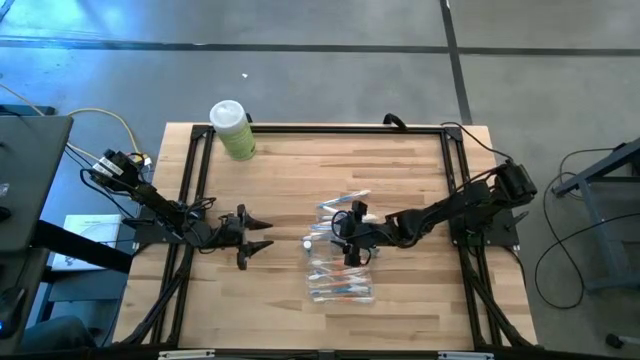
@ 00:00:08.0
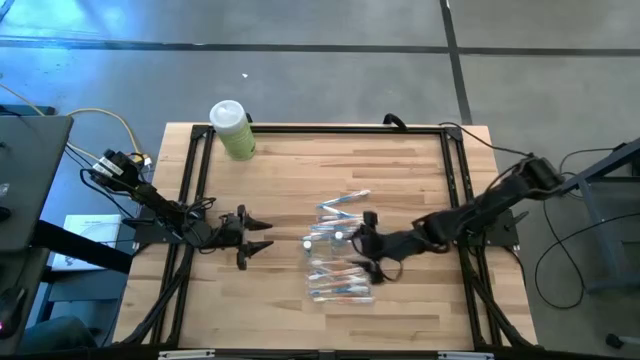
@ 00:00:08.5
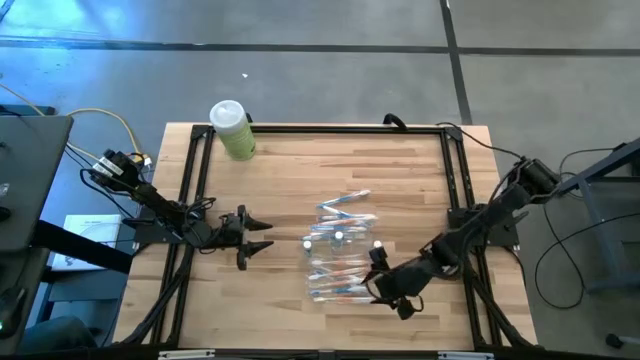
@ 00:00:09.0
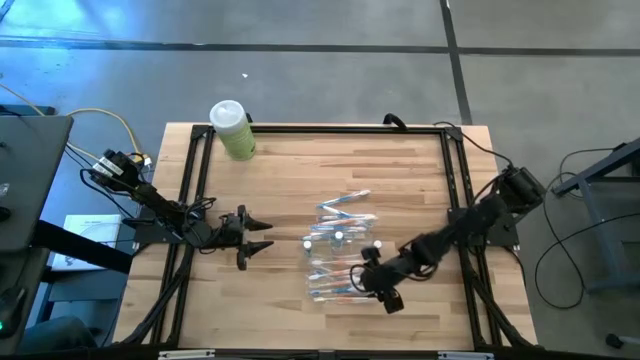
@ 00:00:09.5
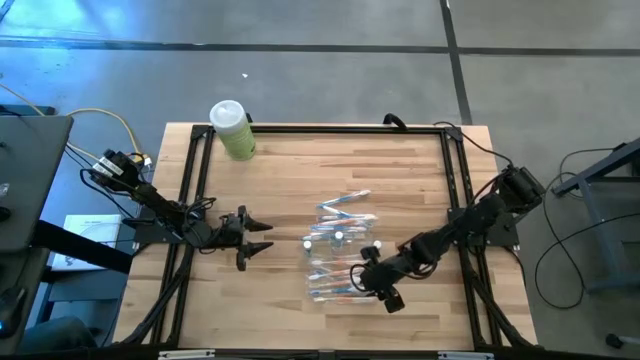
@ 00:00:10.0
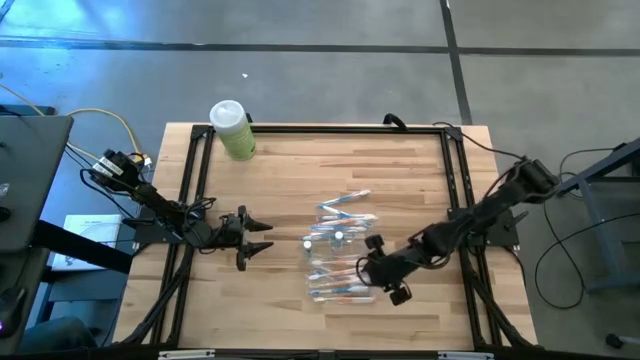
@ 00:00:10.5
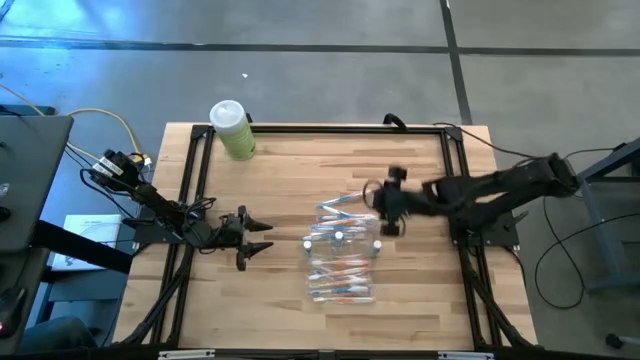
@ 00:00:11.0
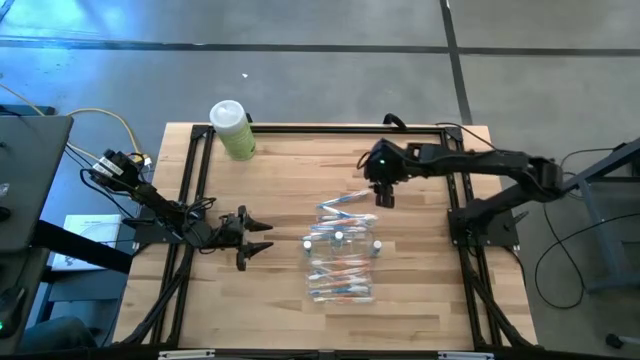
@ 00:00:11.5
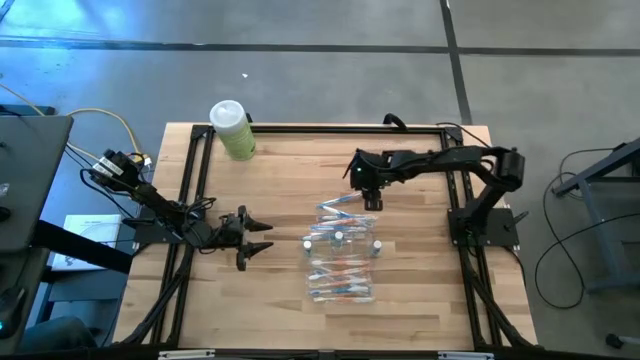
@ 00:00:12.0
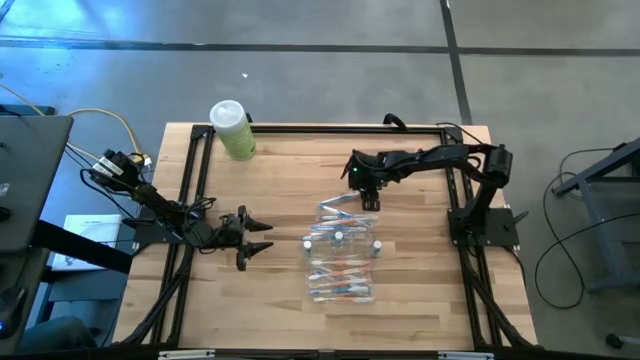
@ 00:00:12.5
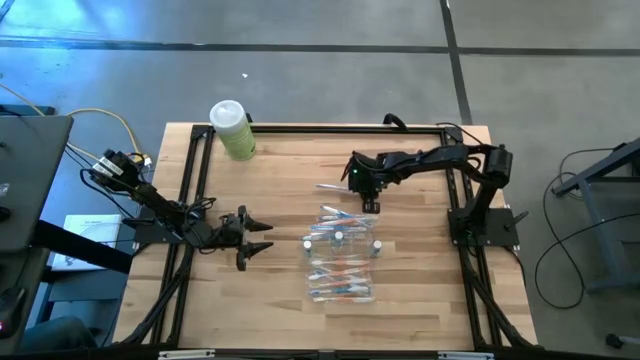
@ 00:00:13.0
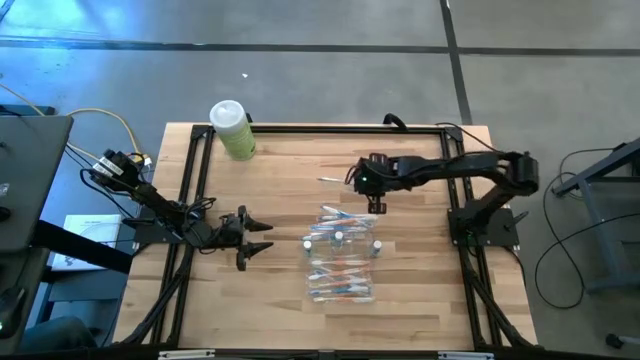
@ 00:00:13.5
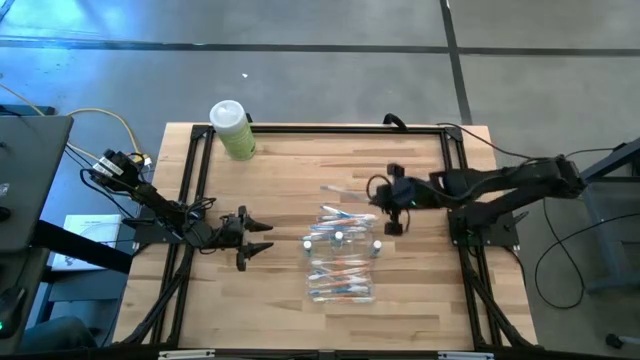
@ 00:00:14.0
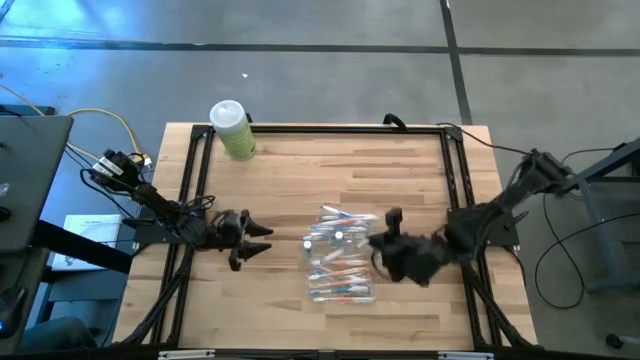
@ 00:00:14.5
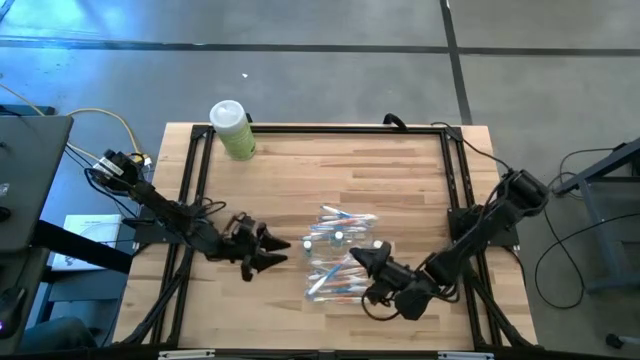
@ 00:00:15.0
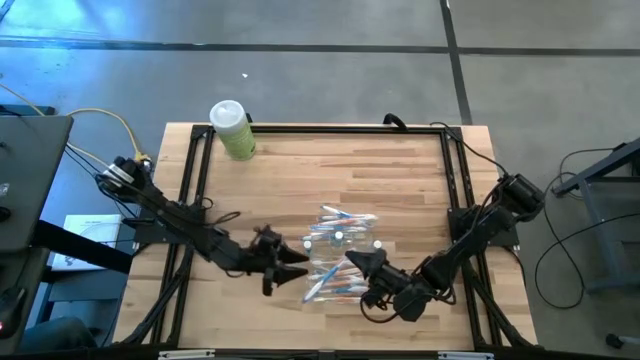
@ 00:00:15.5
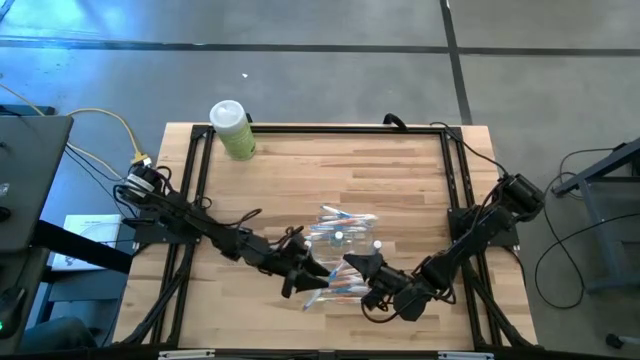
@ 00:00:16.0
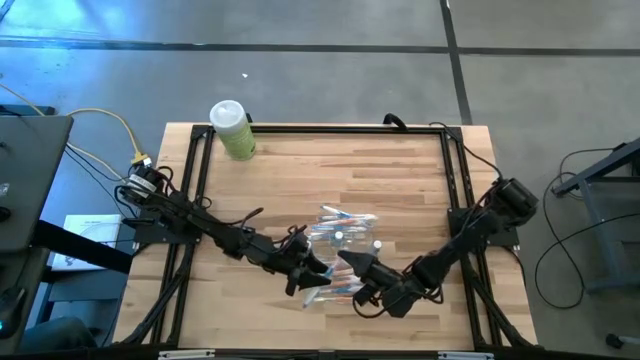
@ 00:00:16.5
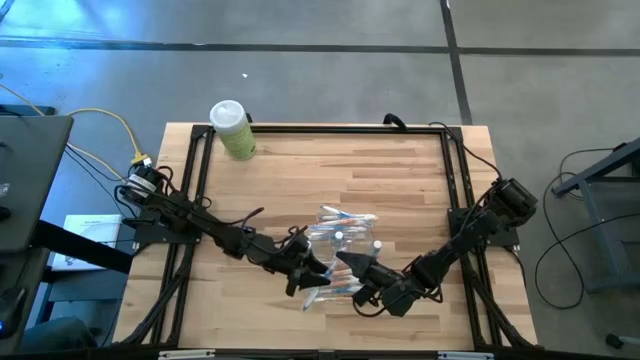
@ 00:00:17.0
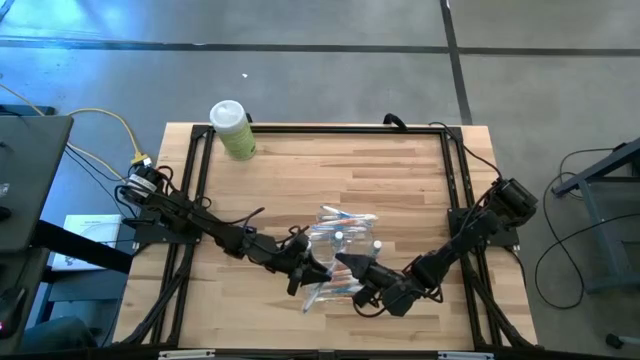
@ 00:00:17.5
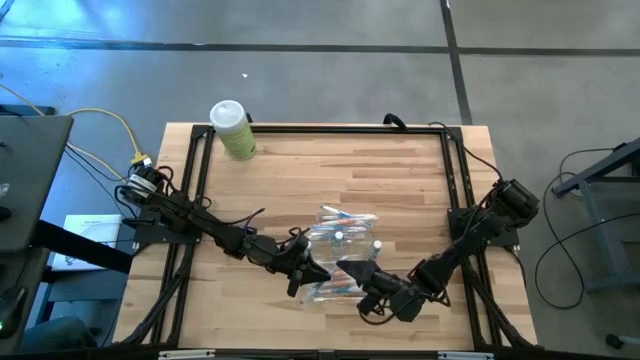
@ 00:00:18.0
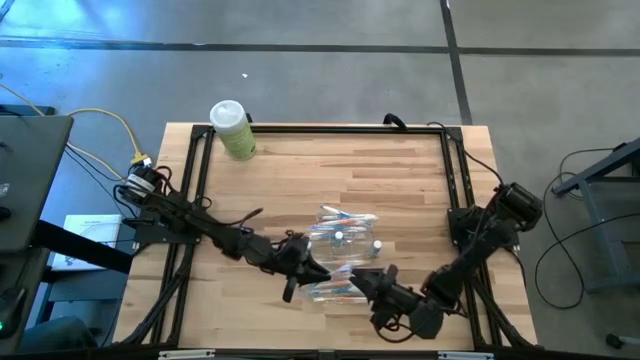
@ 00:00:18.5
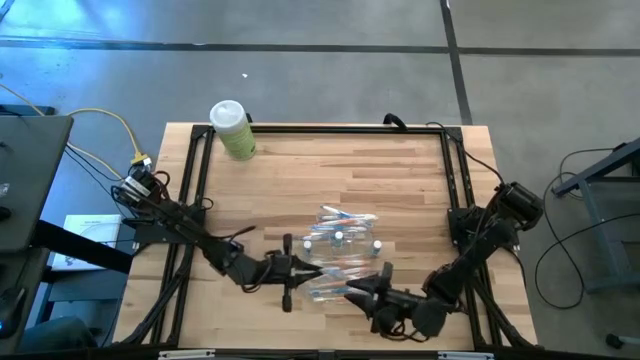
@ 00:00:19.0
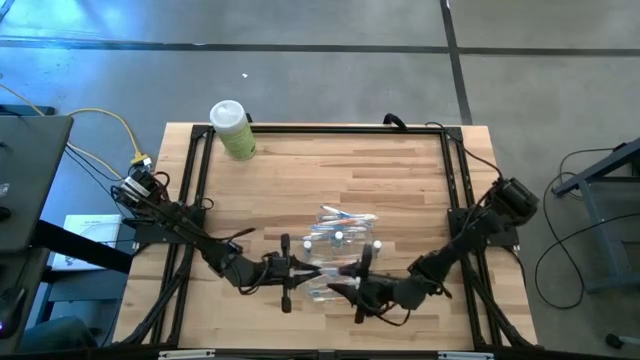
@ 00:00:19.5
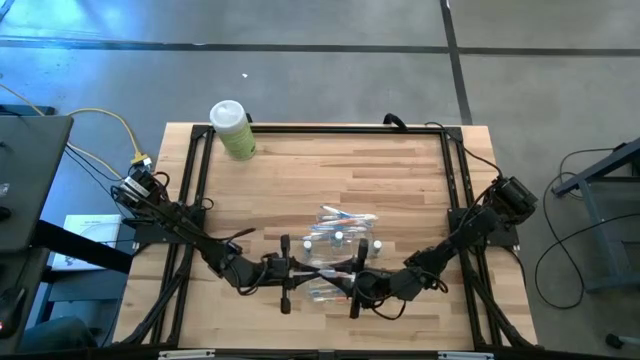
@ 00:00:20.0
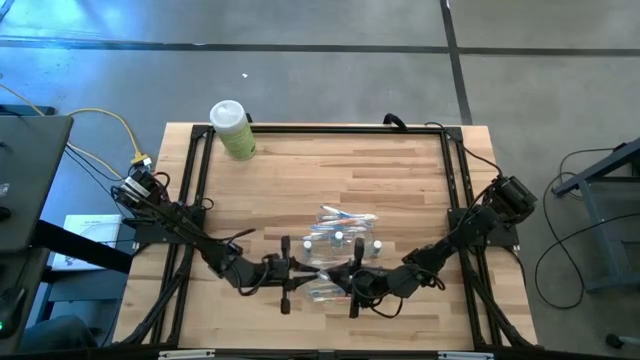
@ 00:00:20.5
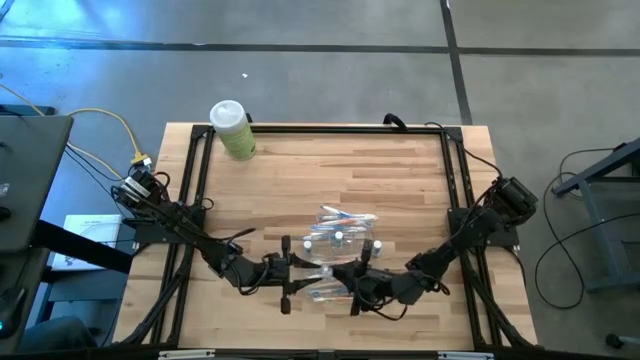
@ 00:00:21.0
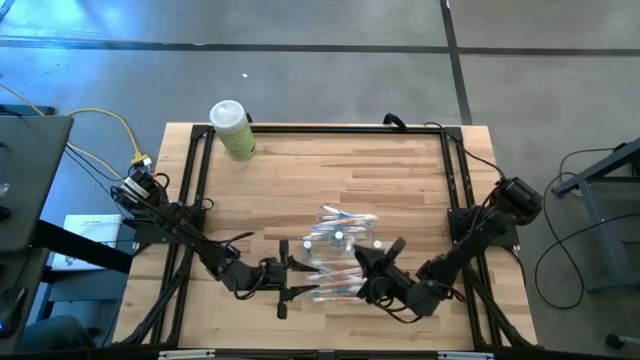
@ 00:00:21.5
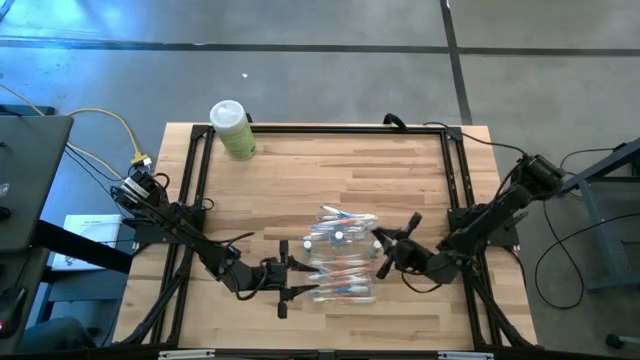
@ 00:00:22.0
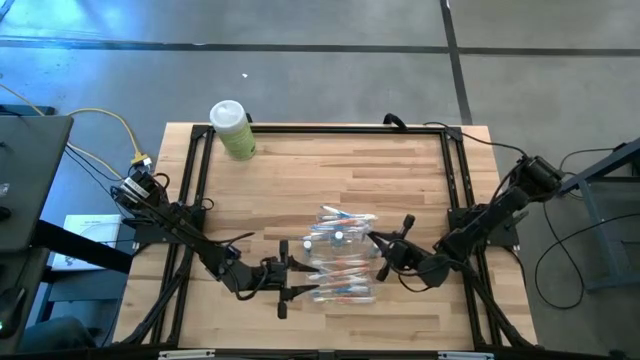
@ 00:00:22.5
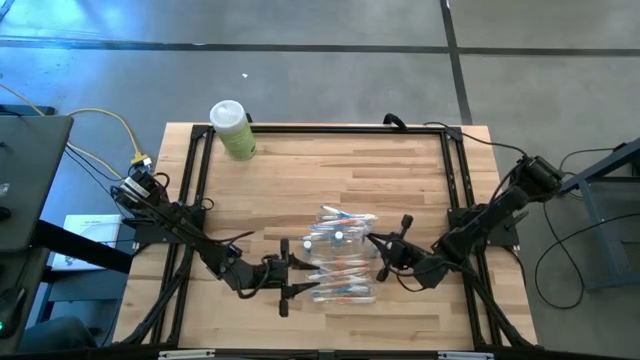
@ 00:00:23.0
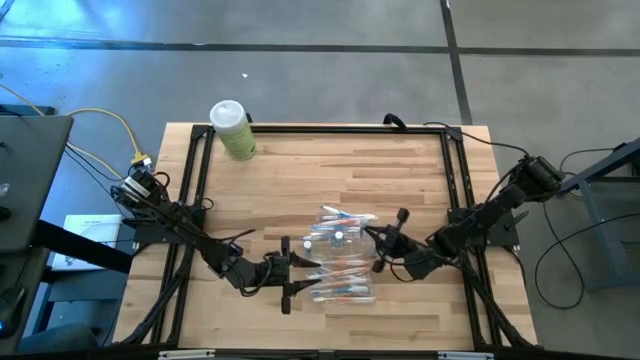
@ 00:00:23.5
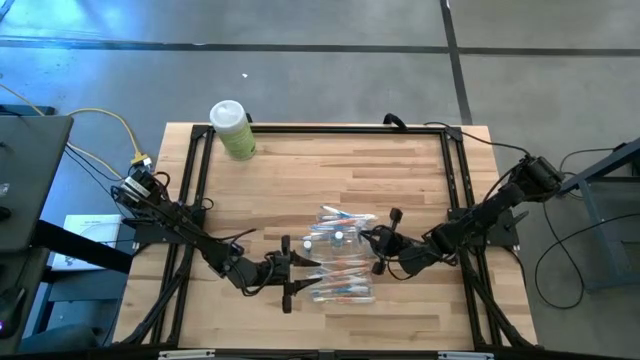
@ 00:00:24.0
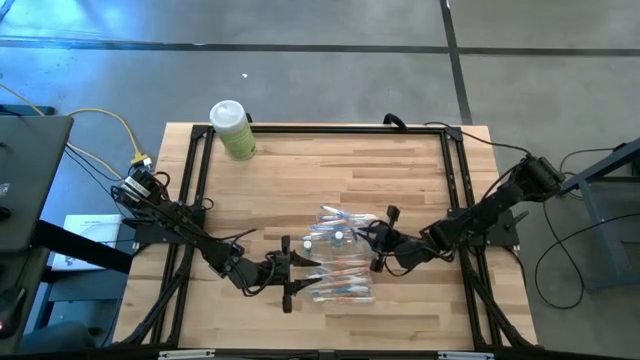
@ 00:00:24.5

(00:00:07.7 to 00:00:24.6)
Task: Pick & Place toothbrushing station
Put the blue toothbrush into the transparent organizer

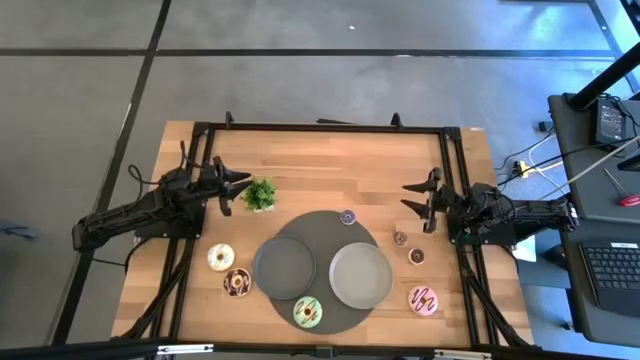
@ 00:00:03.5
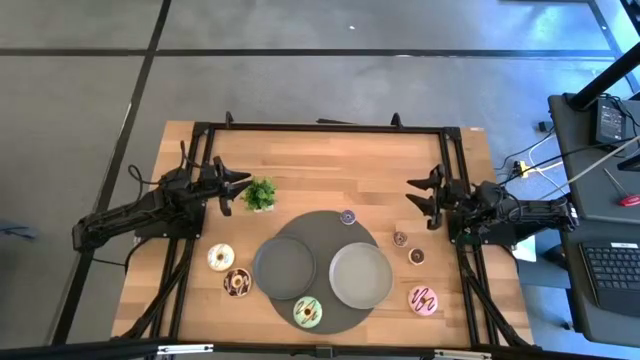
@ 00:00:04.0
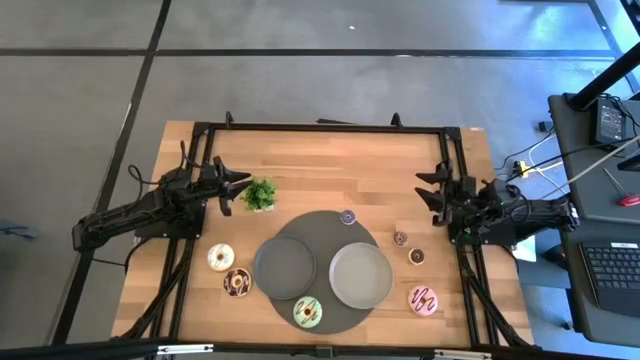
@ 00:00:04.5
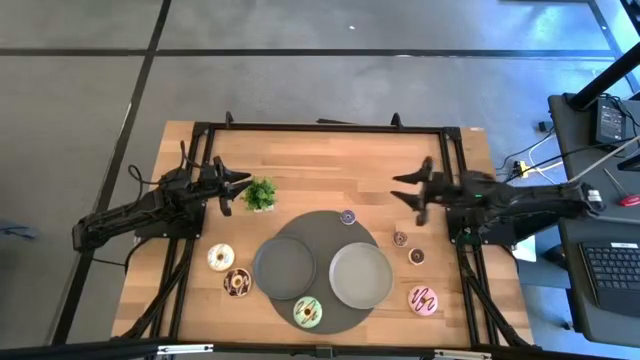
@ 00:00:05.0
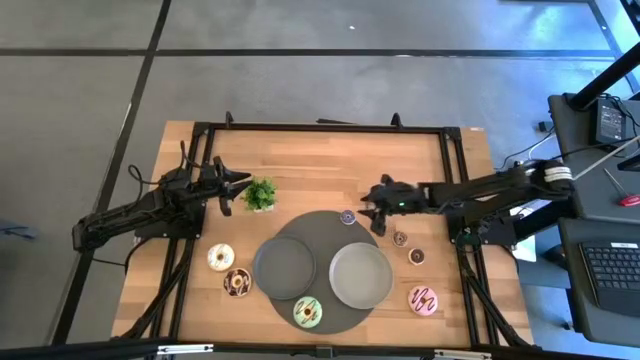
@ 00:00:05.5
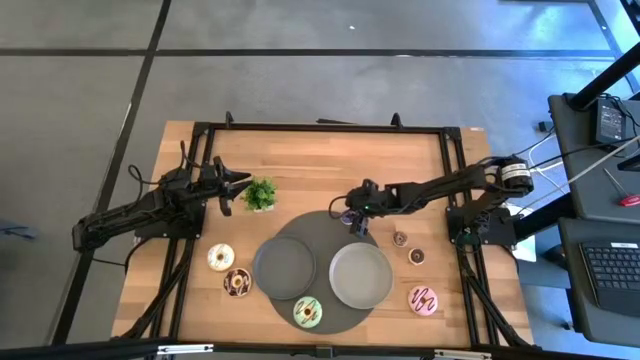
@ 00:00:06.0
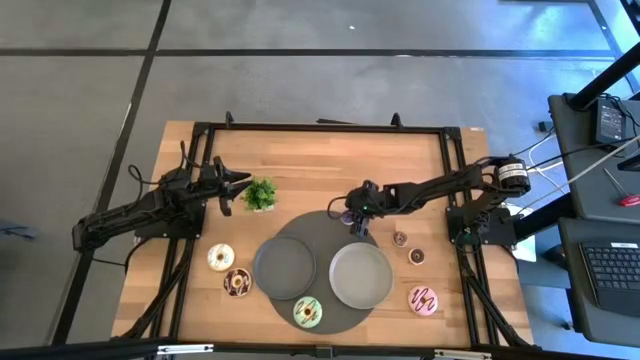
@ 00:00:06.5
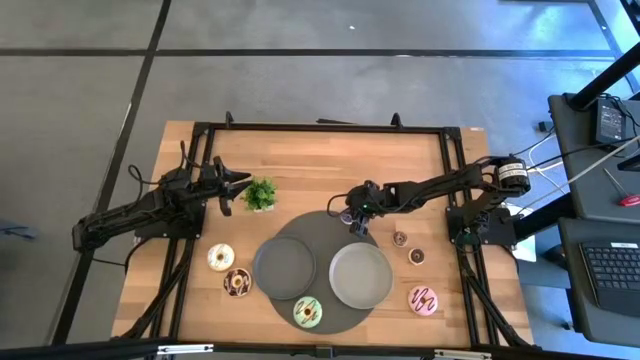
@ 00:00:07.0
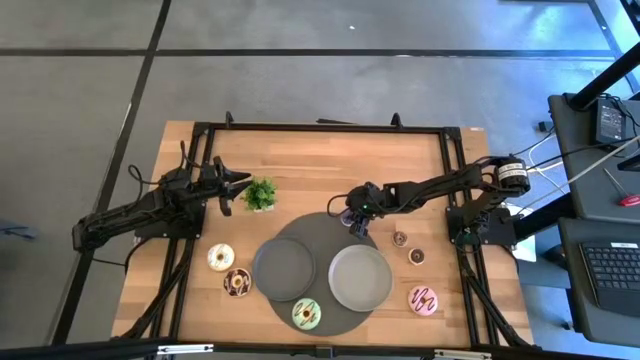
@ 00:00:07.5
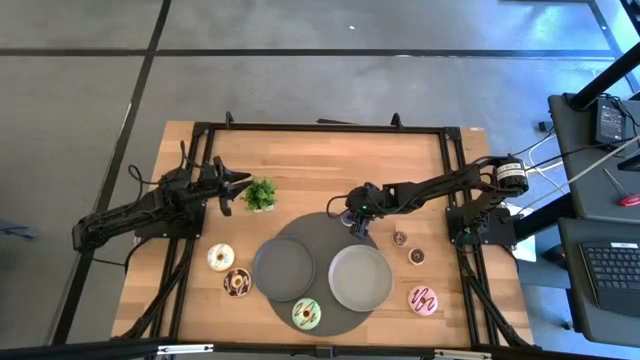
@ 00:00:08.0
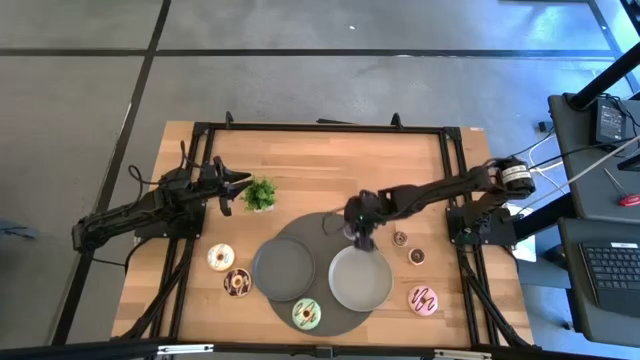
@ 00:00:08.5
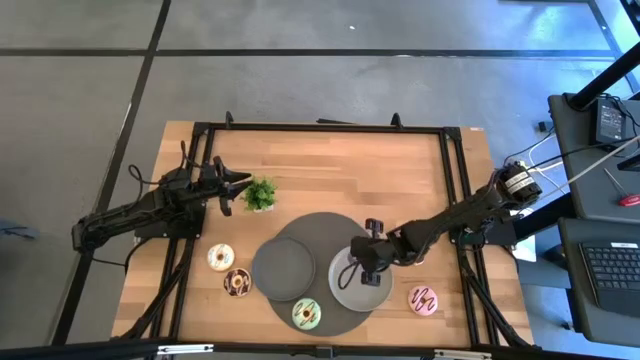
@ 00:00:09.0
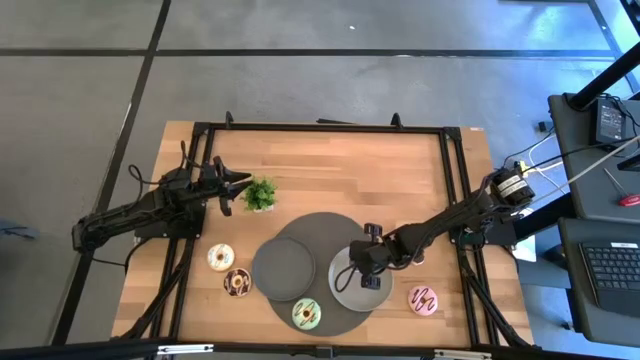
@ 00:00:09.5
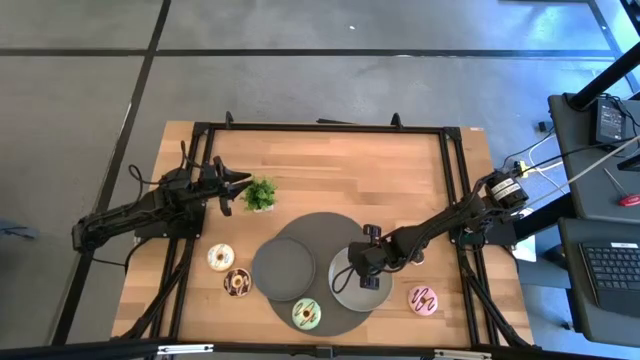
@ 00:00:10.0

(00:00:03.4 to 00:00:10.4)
Task: Pick & Place donuts
Put the small purple donut on the light gray plate
